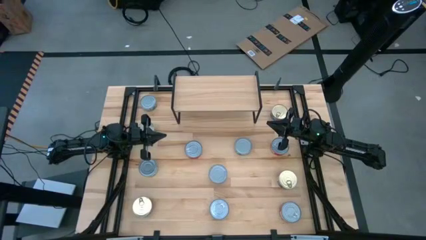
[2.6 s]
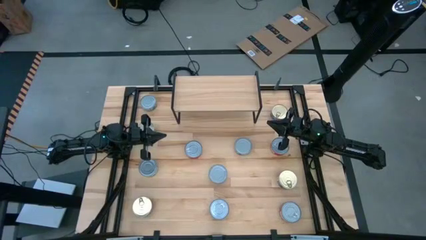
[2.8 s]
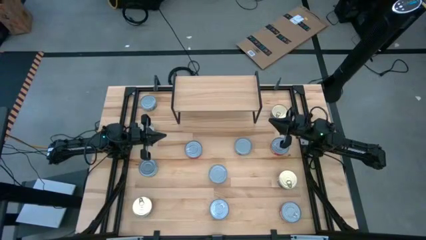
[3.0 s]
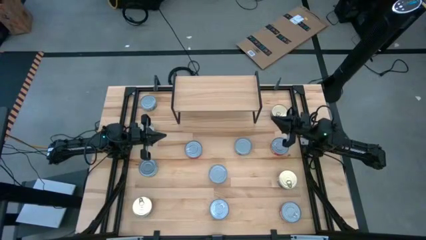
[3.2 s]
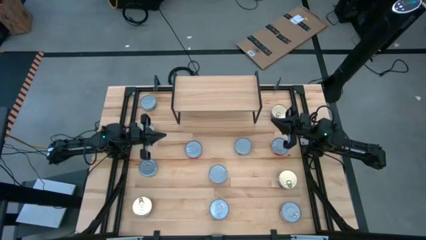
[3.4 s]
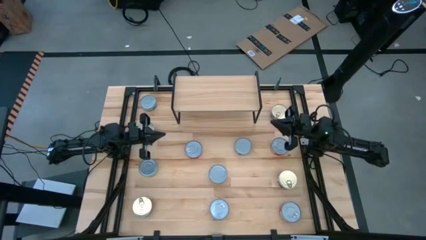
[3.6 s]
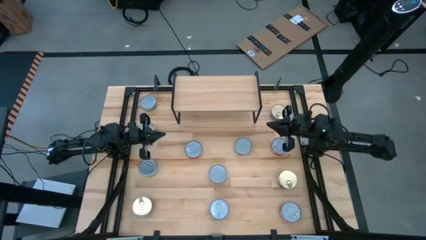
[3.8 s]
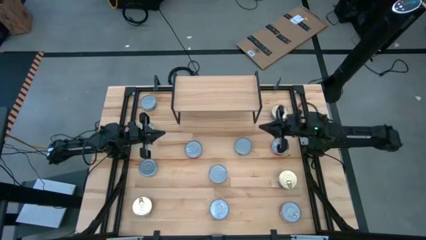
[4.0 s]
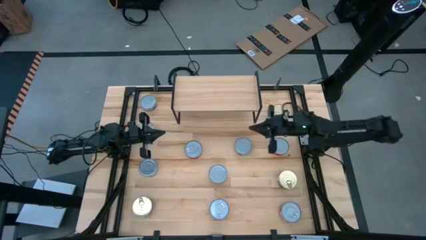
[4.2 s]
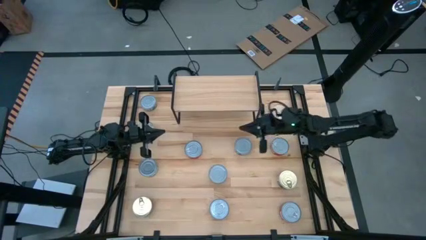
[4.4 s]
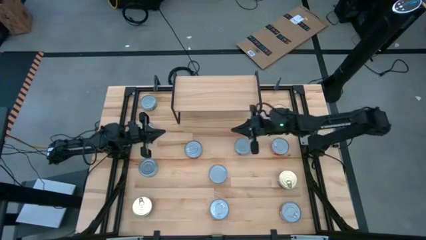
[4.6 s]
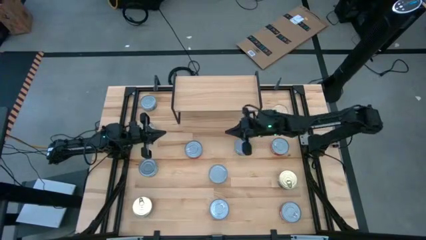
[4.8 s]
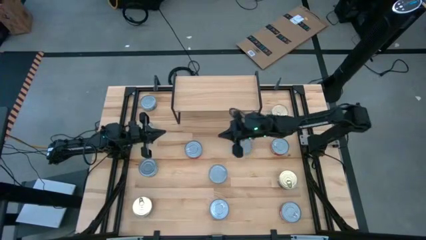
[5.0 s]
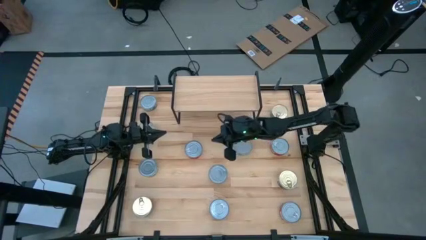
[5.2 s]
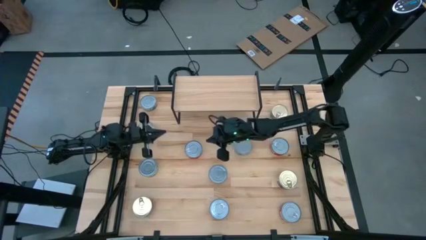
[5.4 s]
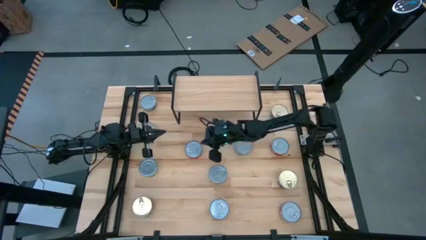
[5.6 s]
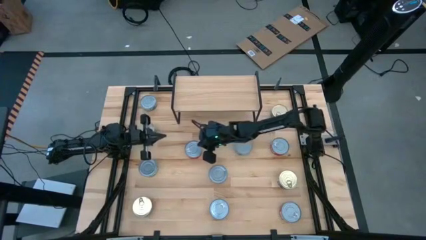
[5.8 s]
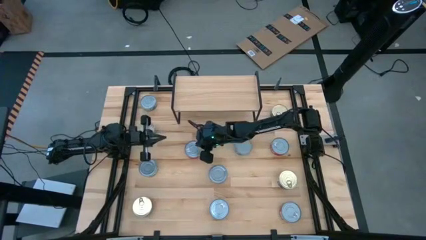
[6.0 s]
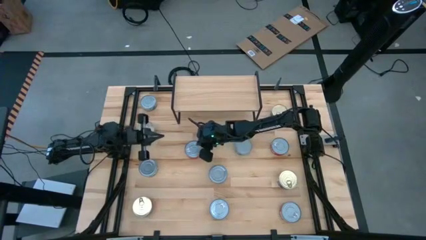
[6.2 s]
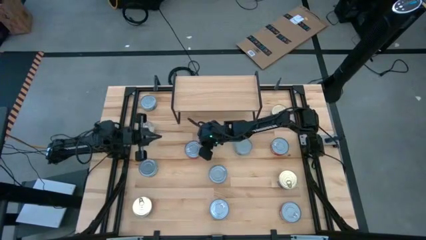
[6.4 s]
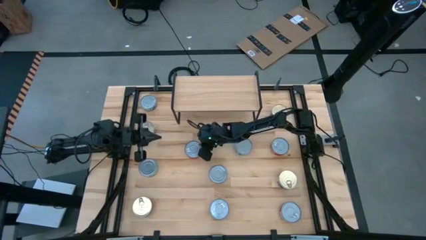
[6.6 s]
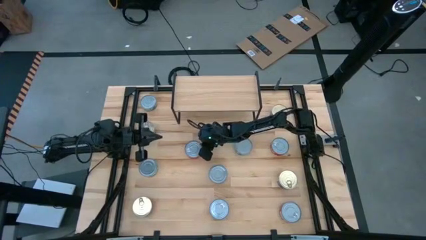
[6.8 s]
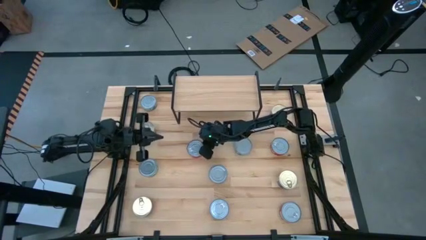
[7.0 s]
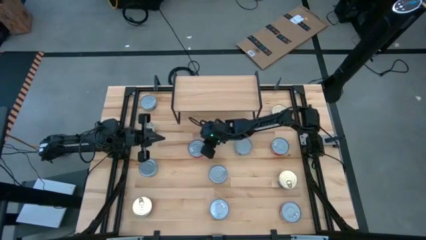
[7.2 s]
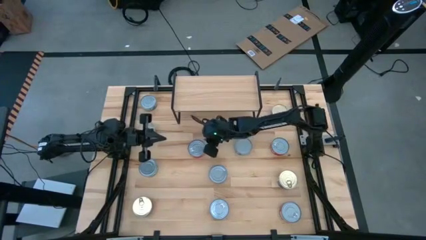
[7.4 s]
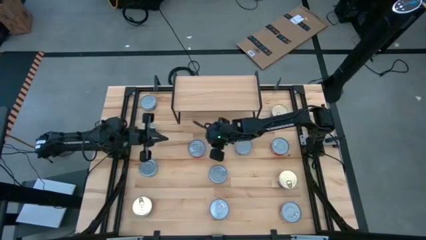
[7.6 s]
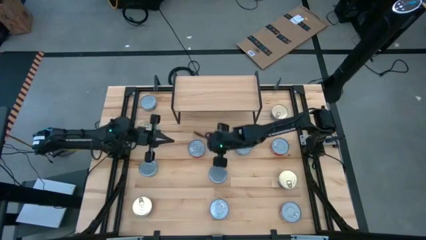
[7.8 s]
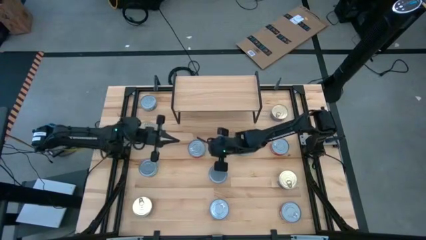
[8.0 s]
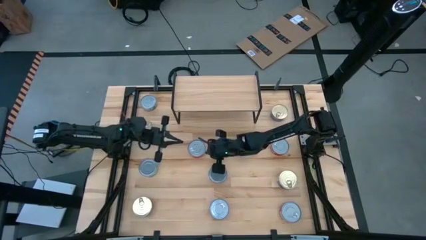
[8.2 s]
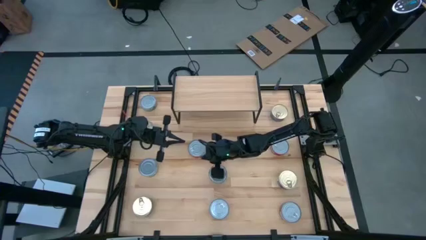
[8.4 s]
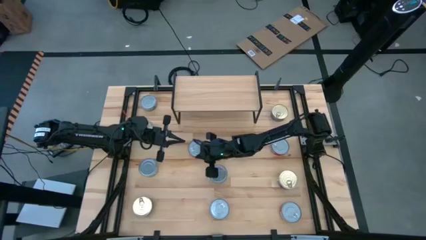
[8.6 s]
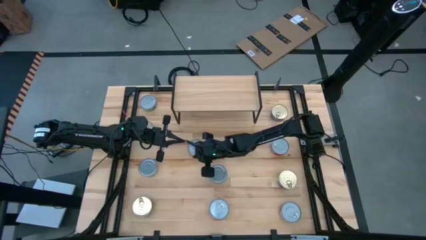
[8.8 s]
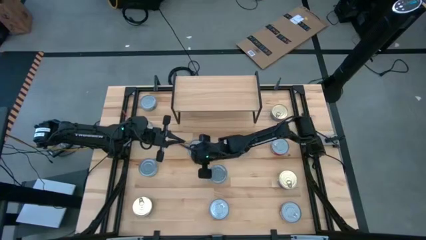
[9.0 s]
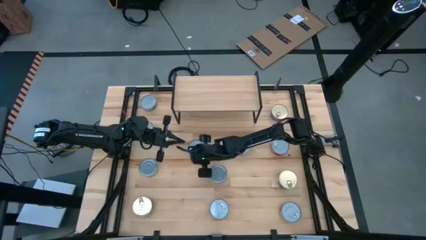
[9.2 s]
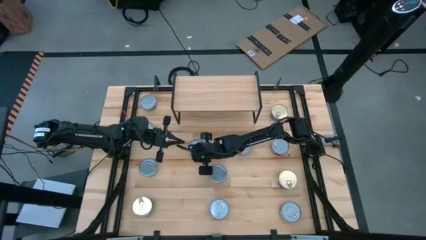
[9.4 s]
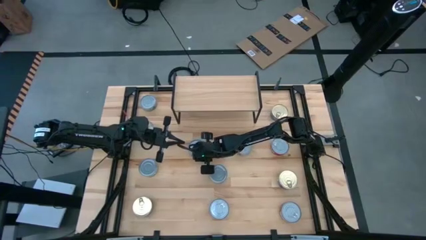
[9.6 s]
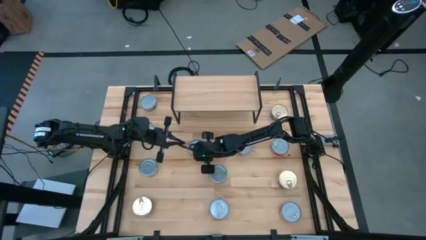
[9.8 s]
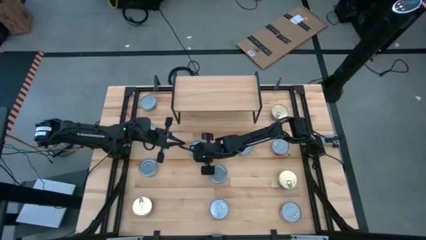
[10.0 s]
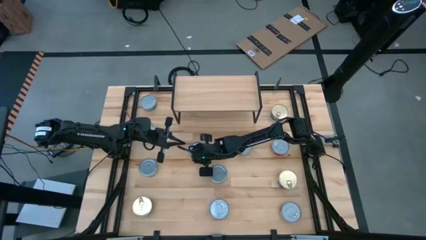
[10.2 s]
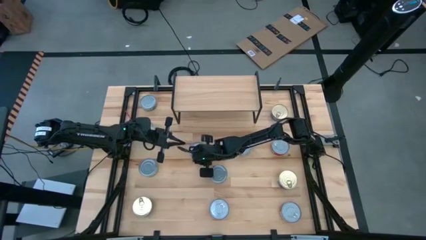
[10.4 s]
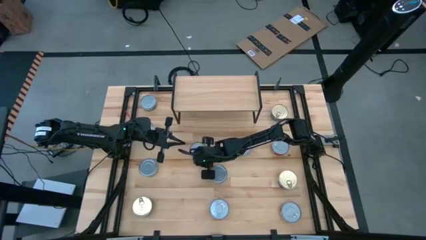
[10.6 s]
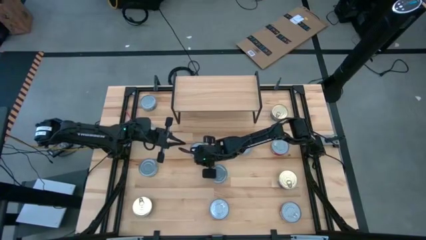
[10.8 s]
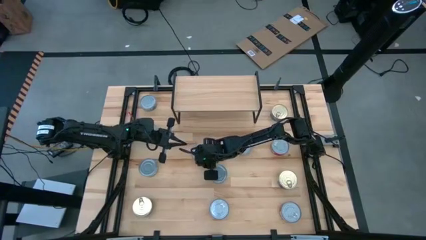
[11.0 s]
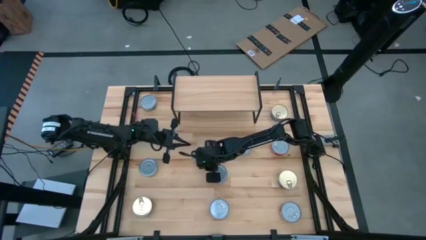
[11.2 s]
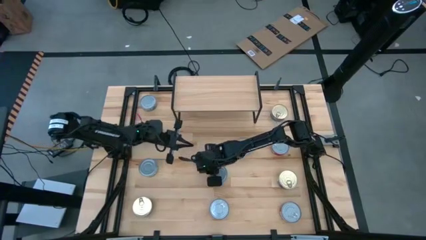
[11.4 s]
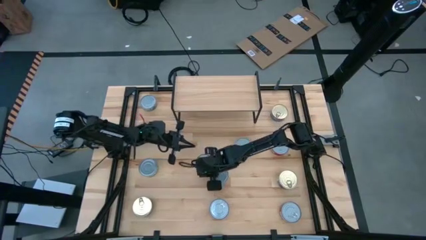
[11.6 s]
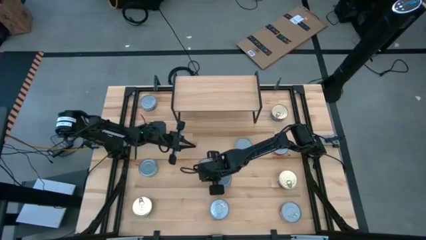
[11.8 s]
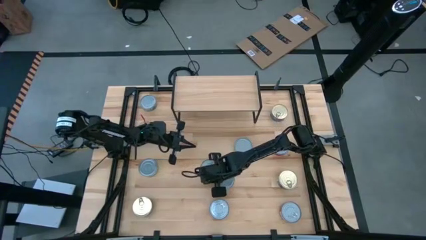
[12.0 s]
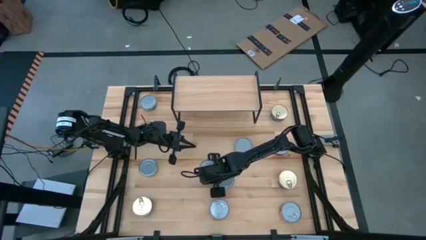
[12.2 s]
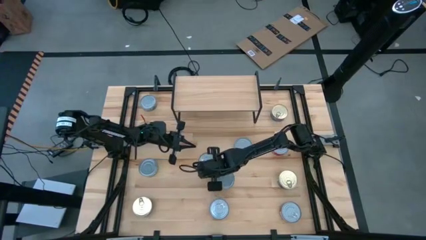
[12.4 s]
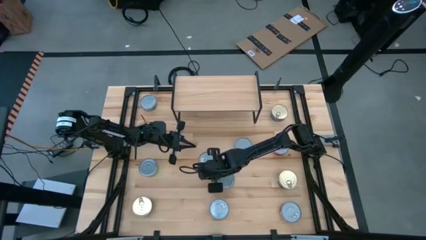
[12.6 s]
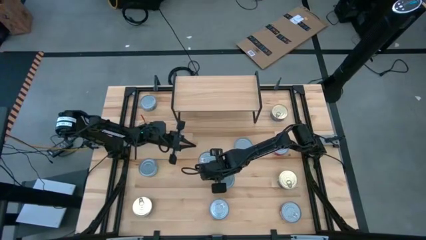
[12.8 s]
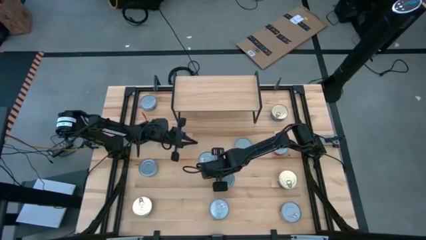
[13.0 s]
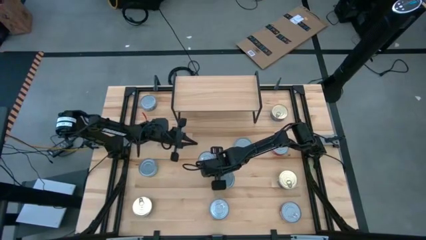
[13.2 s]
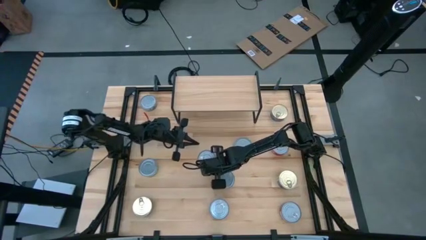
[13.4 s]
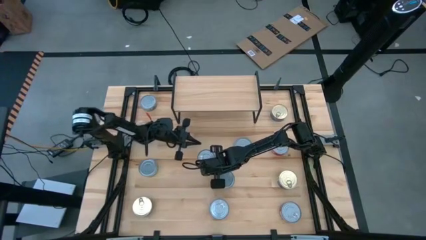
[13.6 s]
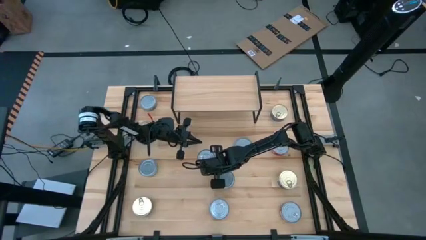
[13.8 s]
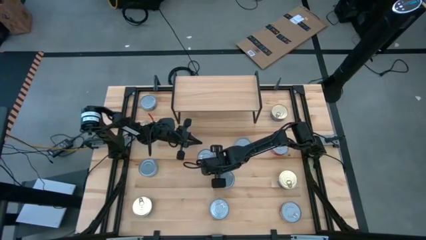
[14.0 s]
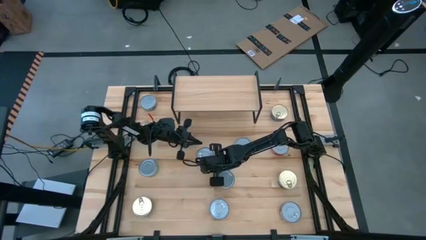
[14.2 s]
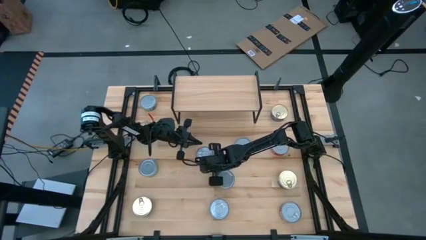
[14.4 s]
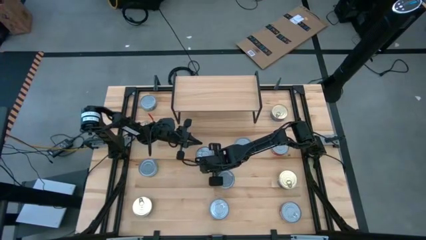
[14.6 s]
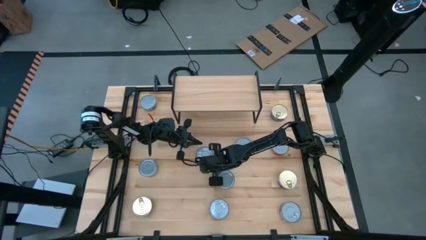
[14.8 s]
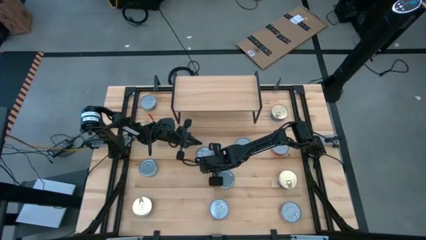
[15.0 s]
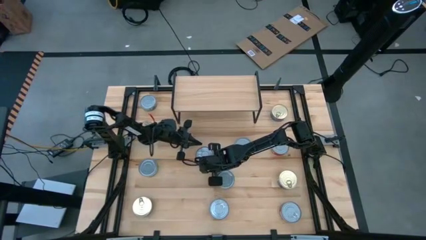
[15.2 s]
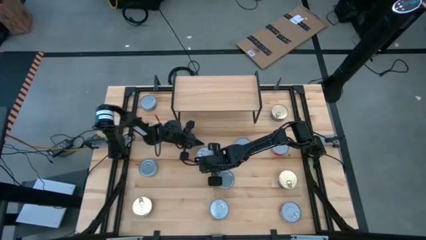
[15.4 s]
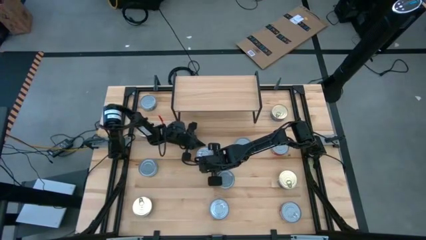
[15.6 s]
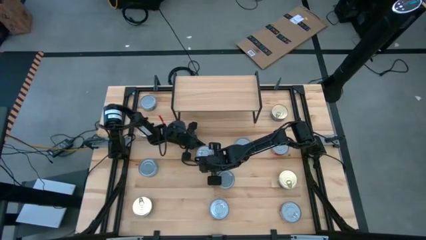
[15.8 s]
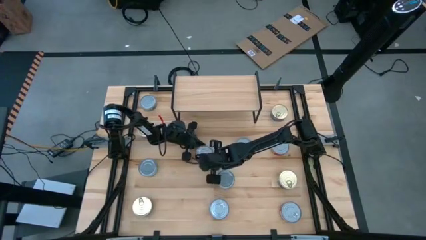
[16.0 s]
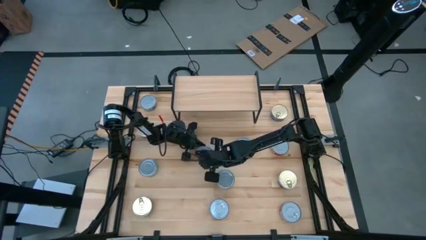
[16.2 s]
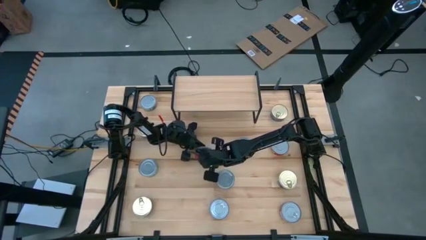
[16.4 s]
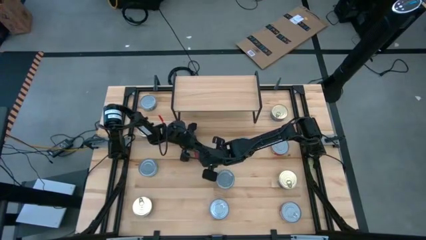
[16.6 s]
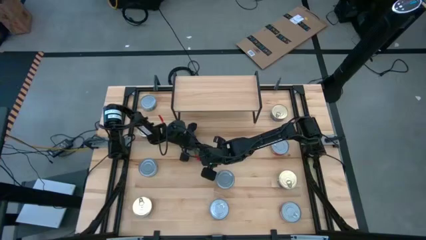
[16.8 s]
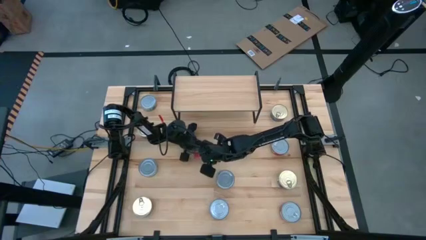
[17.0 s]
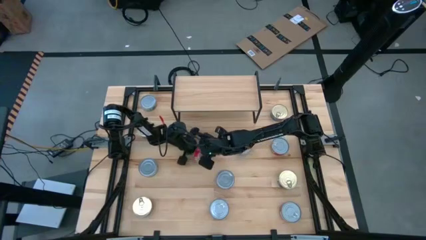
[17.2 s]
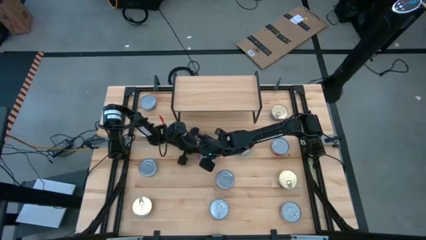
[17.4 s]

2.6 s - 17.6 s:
Task: Stack canned seafood by type on shelf
Put the red tuna can on the shelf
